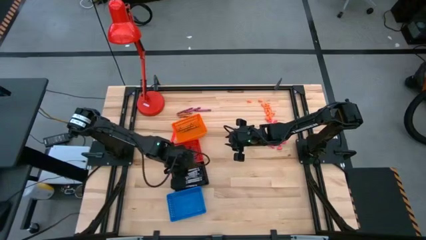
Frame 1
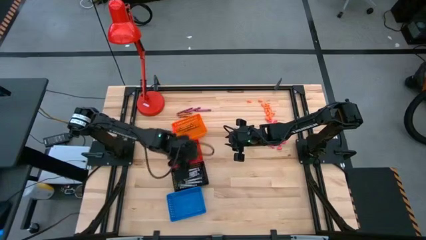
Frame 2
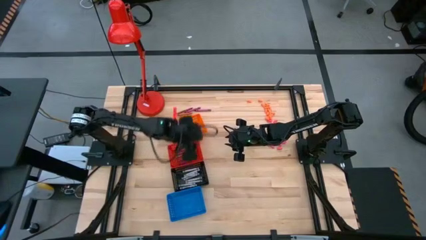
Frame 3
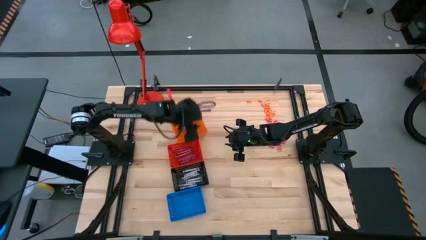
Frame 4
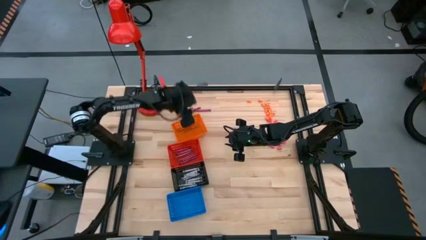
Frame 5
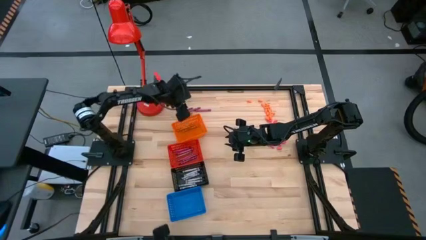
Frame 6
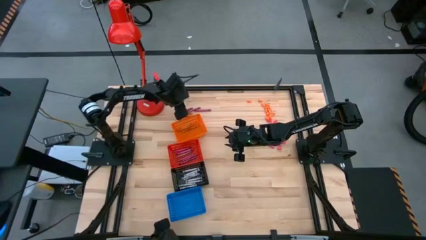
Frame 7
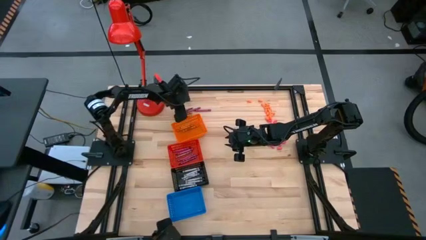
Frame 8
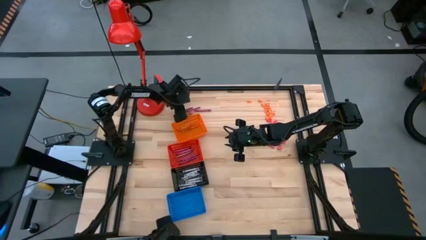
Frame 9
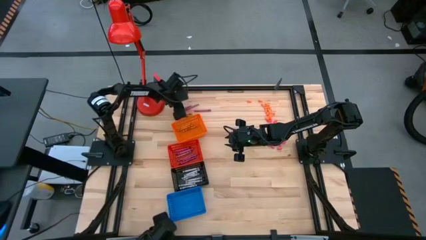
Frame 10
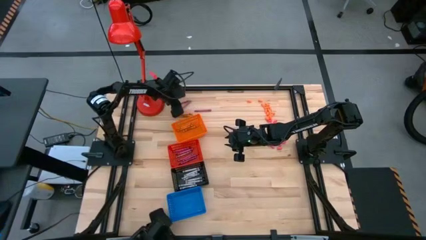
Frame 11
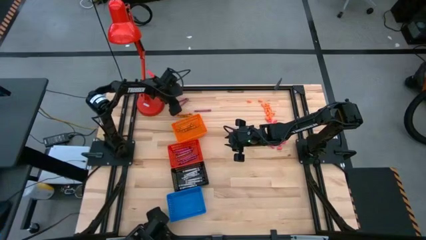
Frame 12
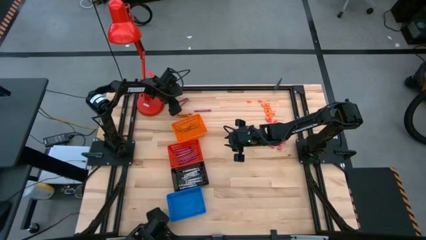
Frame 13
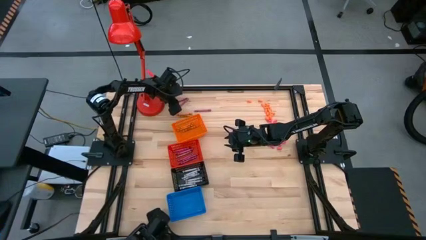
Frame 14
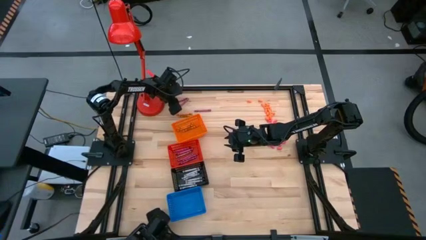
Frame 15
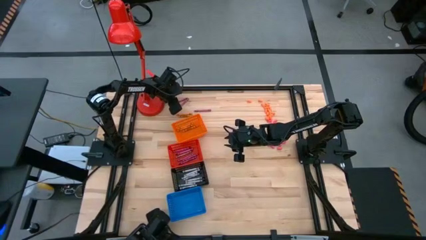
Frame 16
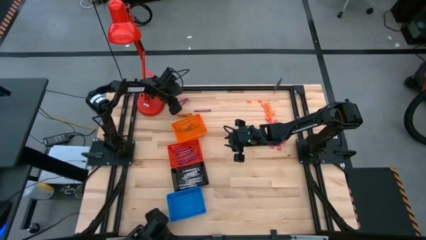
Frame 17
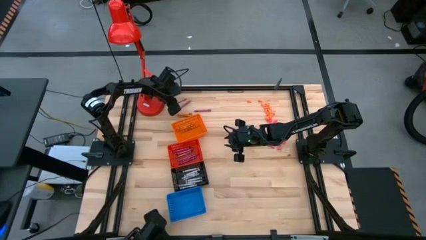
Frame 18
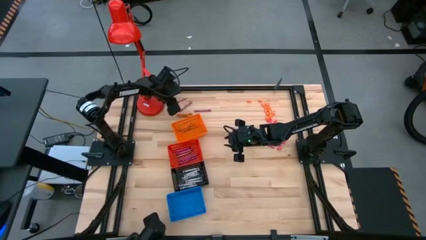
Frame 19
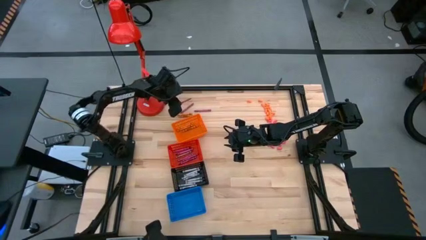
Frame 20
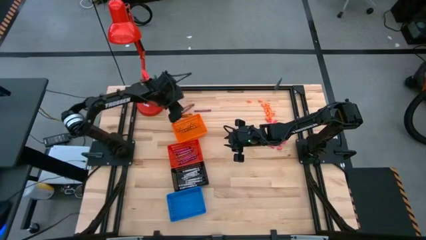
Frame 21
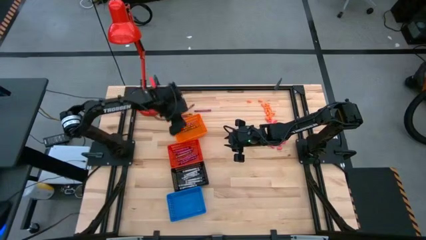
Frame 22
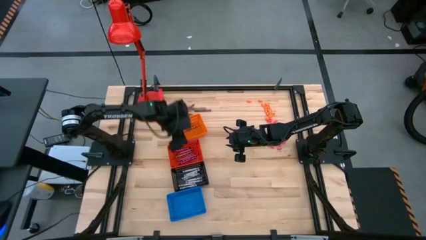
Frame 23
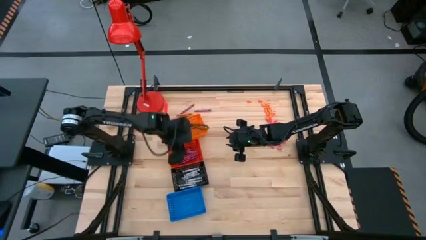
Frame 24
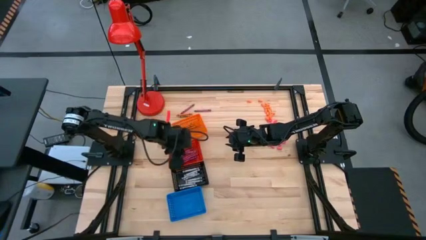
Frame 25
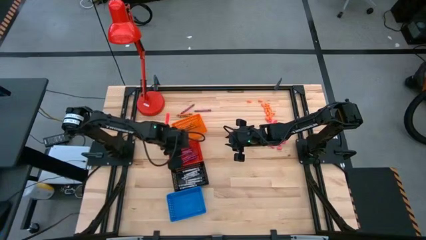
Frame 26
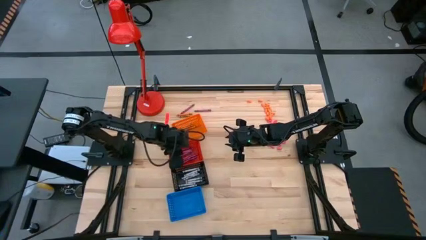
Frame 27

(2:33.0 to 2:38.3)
Task: Sort crayons
Put the red crayon into the red basket

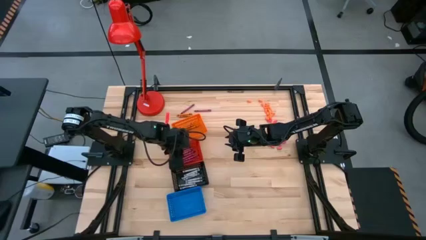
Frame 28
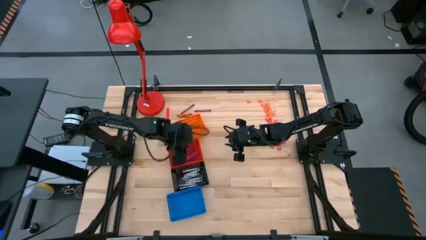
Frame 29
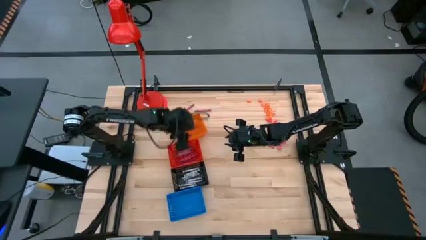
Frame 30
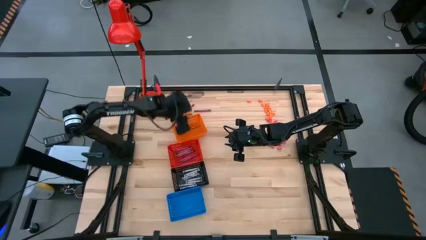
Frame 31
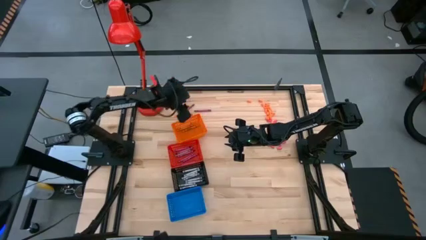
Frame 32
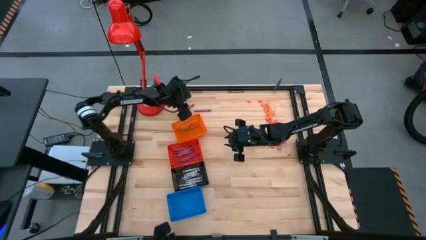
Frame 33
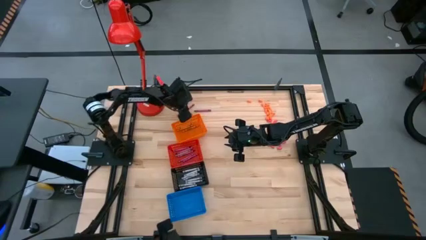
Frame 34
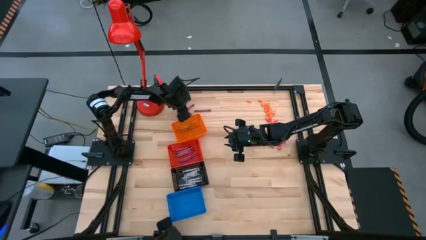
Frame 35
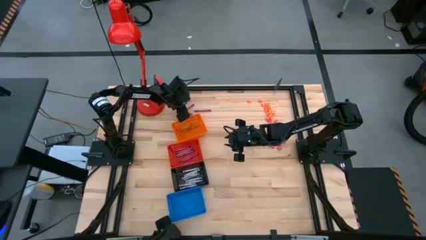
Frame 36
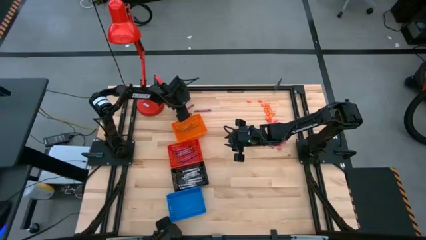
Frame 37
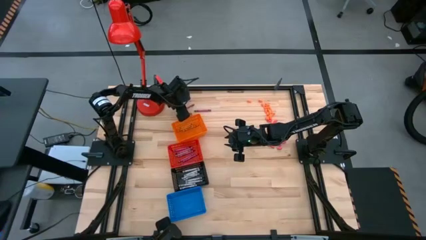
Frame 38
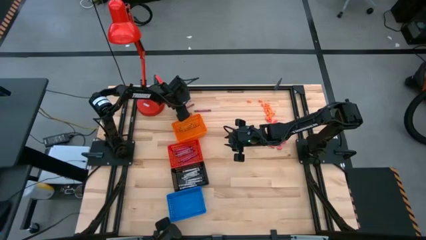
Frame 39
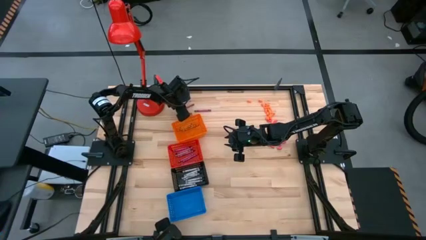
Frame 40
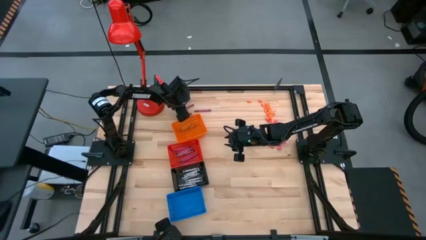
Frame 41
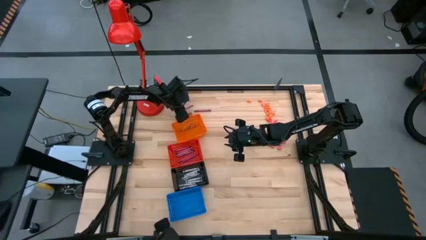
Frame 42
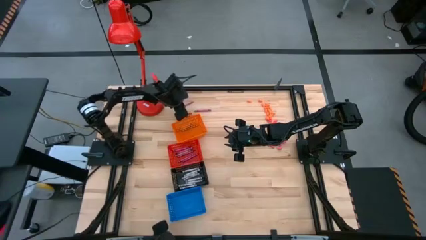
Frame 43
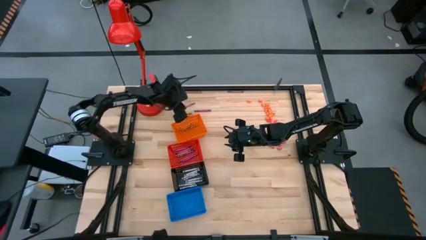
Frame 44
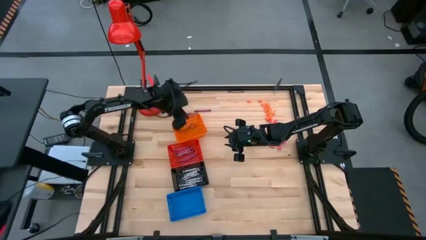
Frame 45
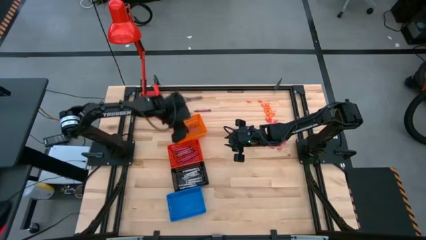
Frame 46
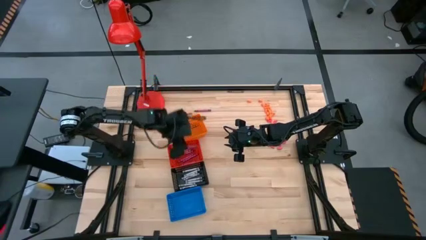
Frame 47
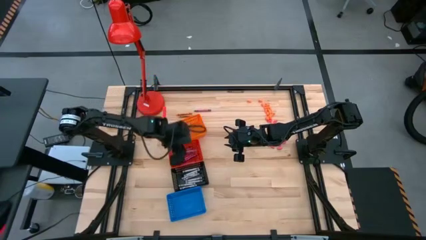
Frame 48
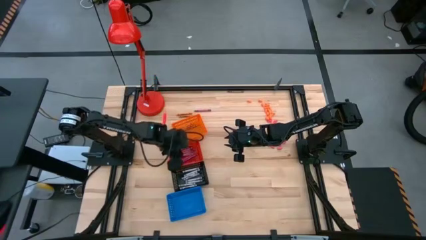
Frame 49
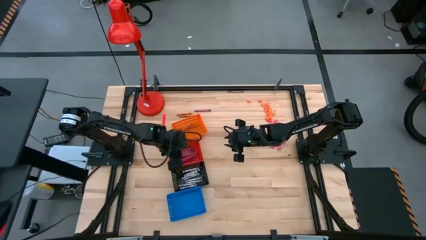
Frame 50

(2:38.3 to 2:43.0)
Put the red crayon into the red basket

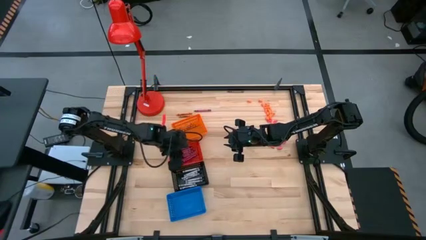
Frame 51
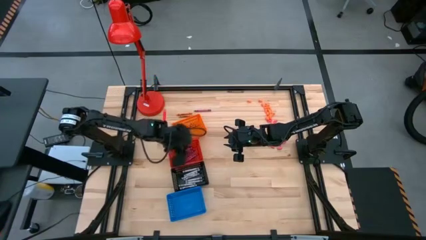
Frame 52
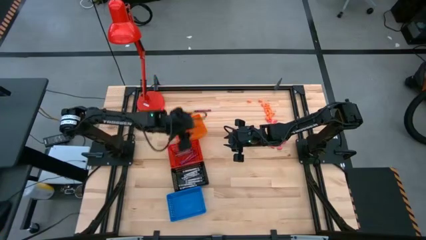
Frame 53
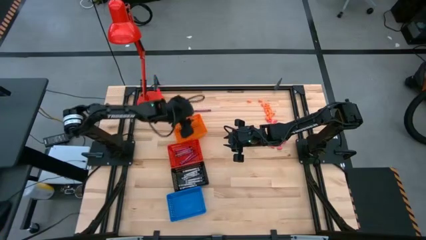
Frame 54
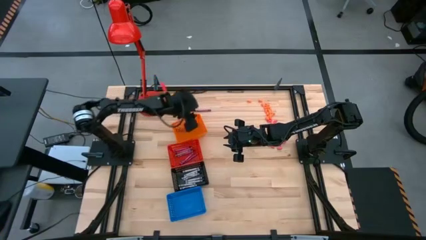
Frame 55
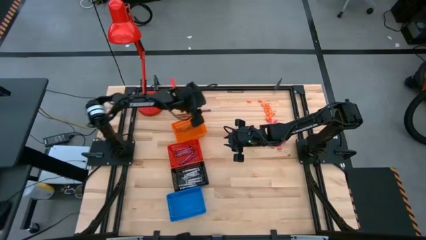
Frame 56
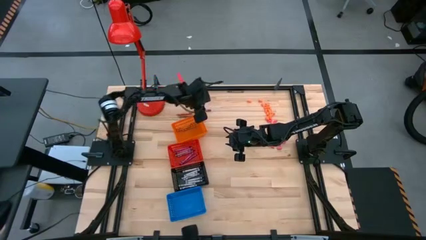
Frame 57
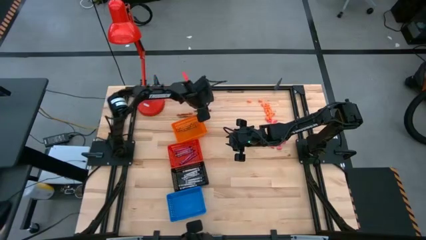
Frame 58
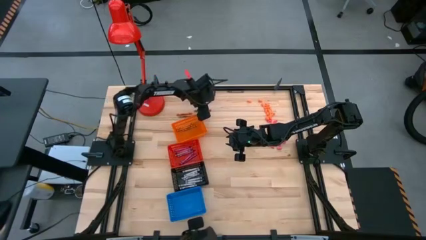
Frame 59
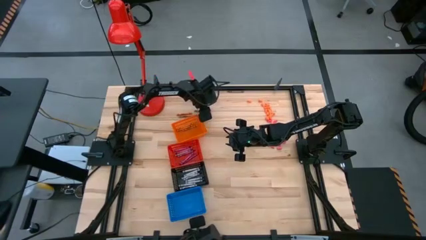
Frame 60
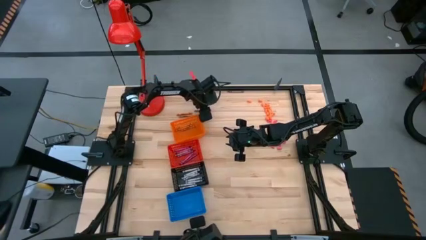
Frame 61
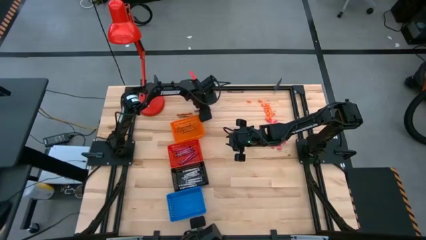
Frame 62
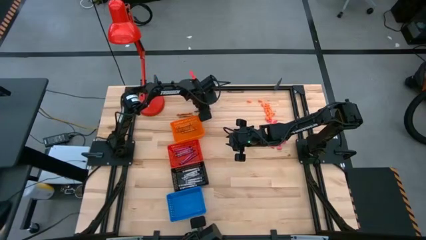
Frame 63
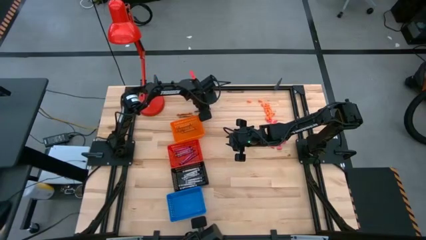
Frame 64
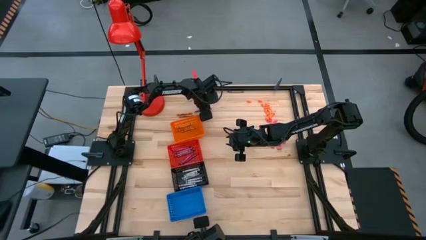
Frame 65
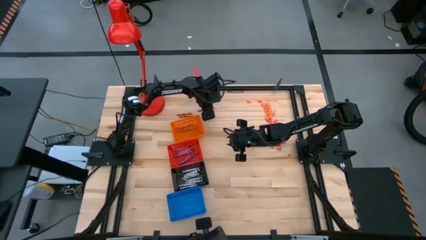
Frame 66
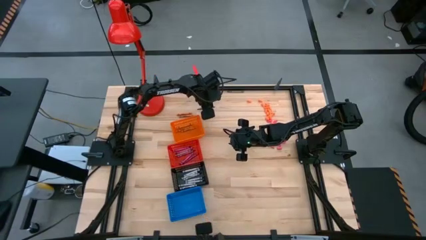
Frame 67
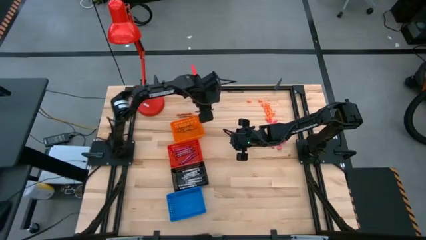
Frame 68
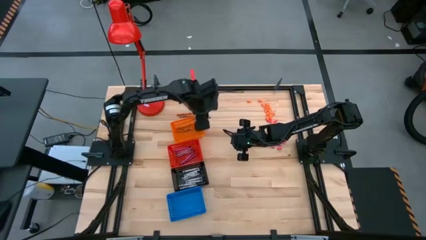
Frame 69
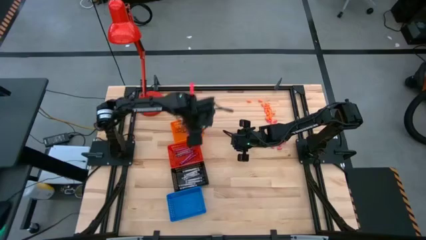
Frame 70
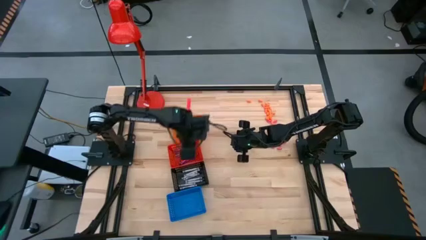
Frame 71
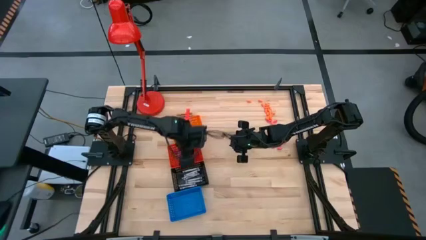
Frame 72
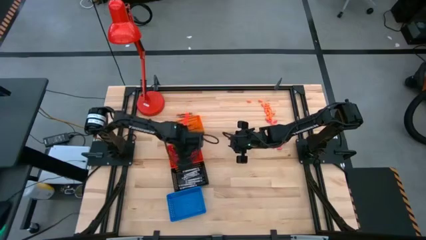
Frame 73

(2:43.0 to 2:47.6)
Put the red crayon into the red basket

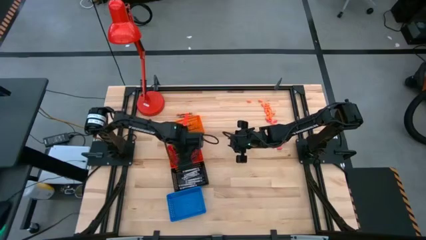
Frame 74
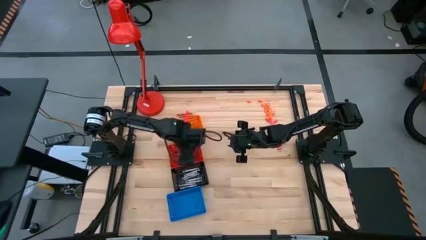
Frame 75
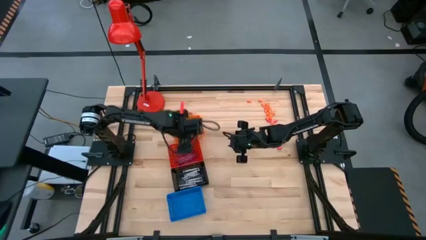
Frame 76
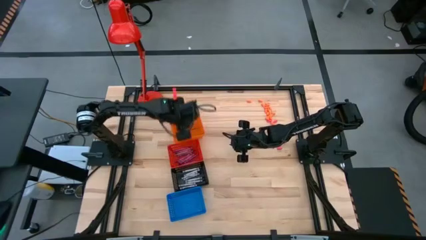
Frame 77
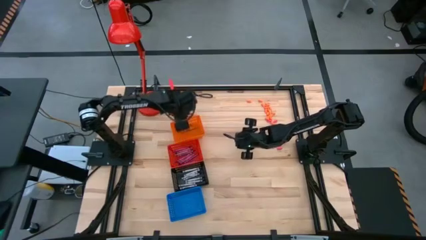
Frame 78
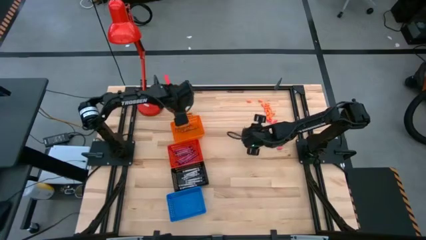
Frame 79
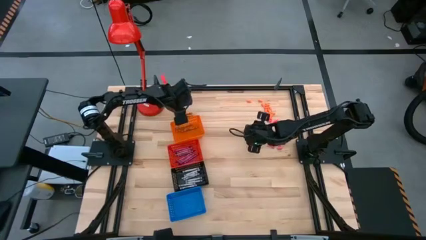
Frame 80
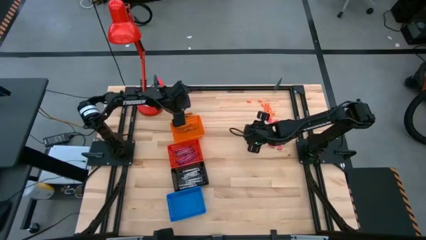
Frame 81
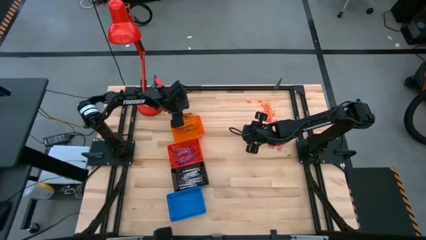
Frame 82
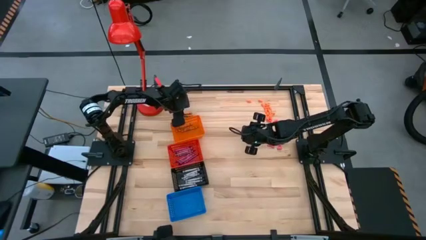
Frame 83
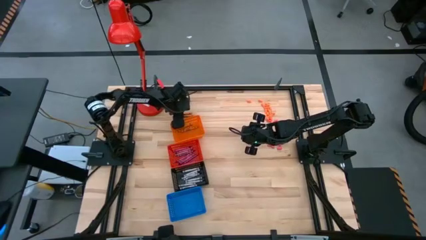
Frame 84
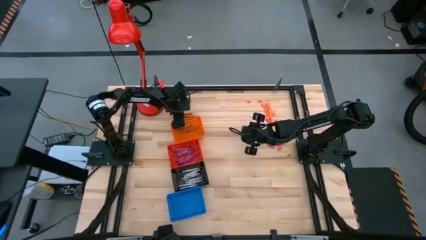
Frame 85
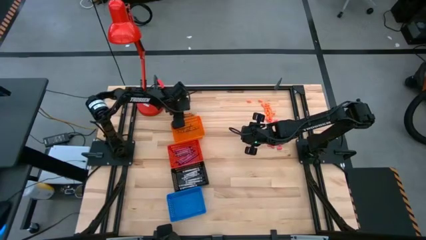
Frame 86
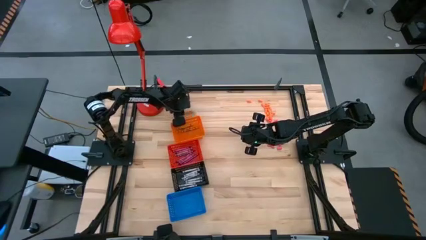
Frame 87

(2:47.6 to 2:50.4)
Put the orange crayon into the orange basket
